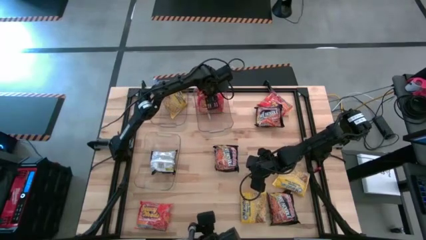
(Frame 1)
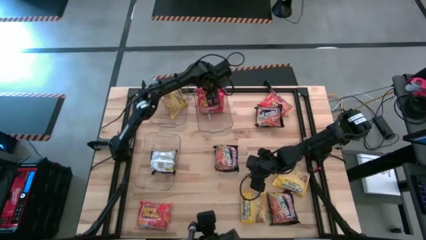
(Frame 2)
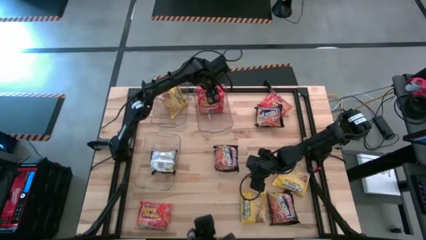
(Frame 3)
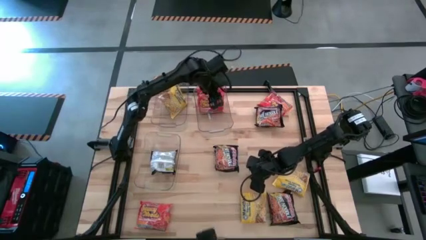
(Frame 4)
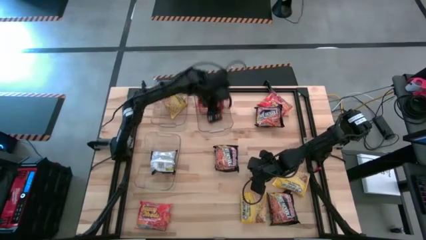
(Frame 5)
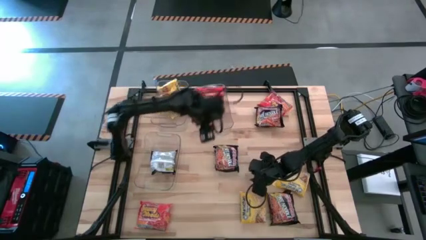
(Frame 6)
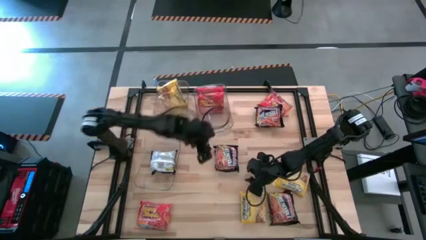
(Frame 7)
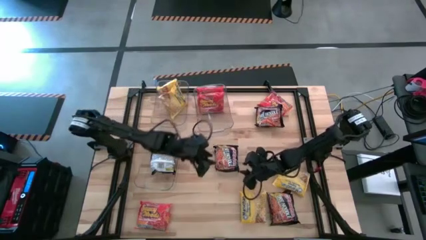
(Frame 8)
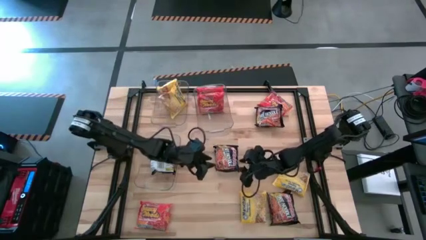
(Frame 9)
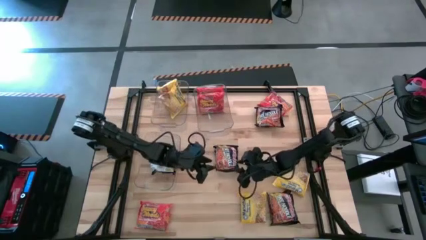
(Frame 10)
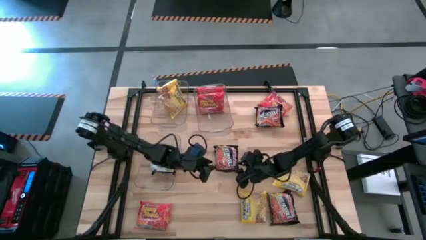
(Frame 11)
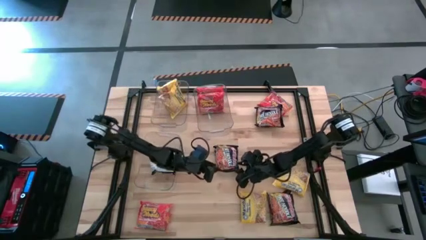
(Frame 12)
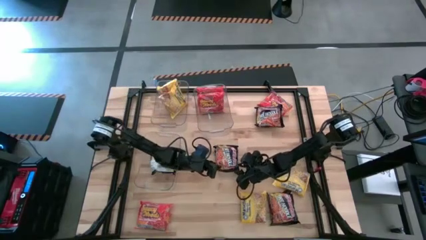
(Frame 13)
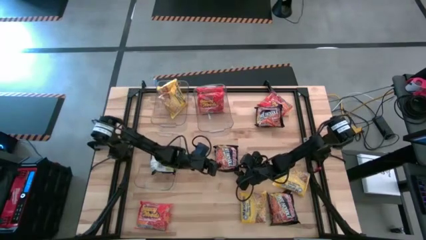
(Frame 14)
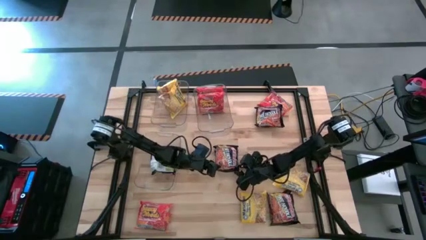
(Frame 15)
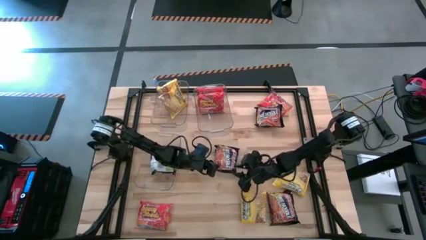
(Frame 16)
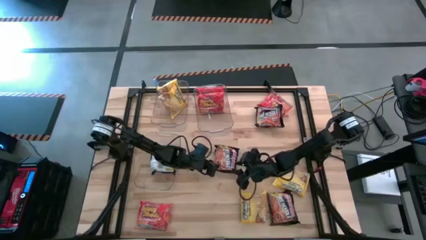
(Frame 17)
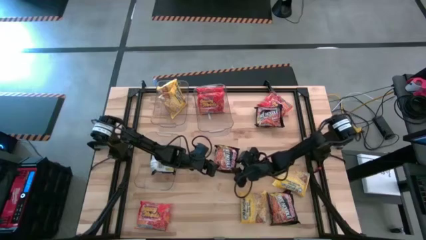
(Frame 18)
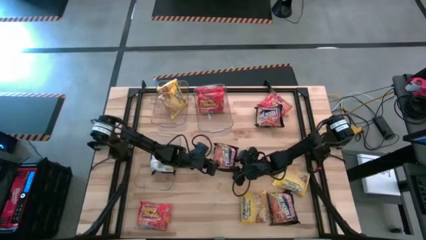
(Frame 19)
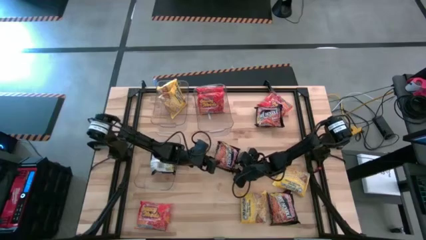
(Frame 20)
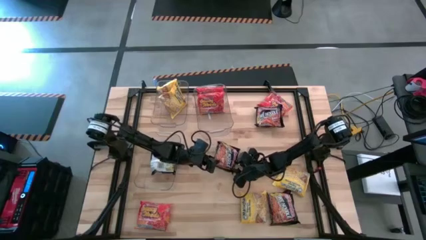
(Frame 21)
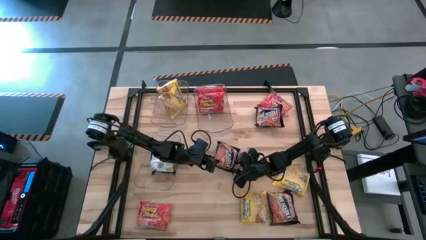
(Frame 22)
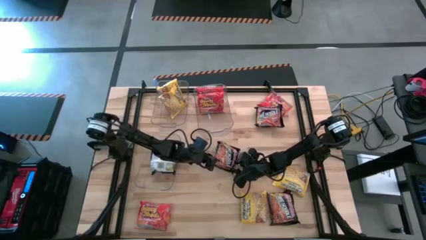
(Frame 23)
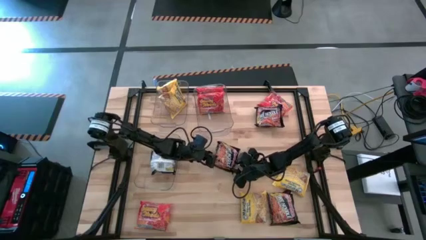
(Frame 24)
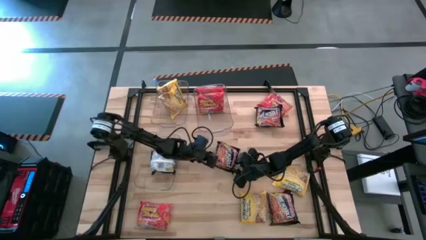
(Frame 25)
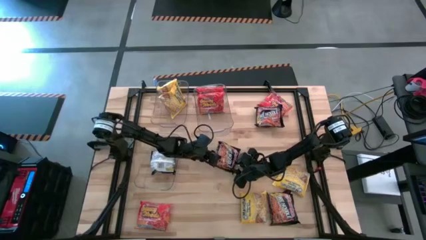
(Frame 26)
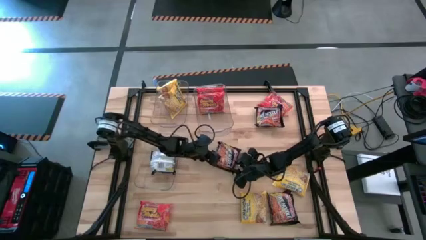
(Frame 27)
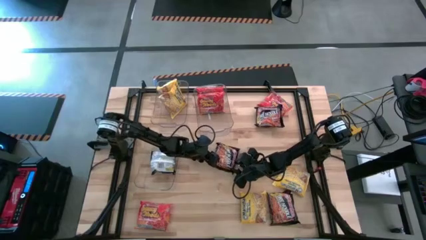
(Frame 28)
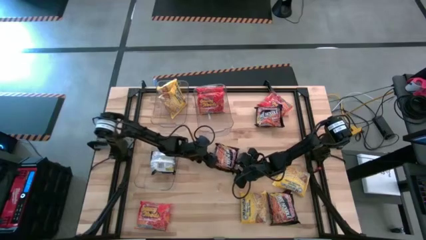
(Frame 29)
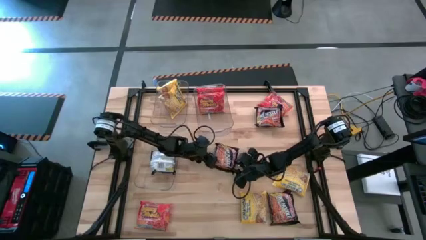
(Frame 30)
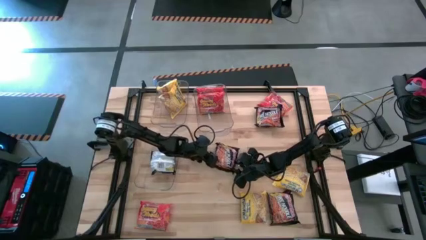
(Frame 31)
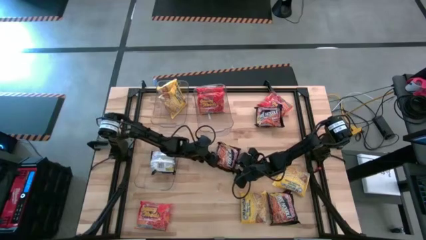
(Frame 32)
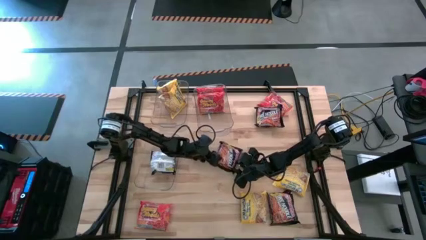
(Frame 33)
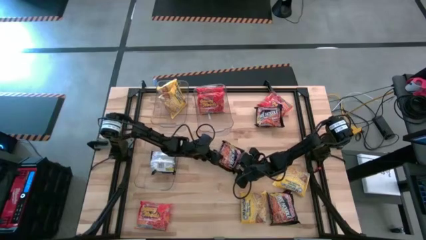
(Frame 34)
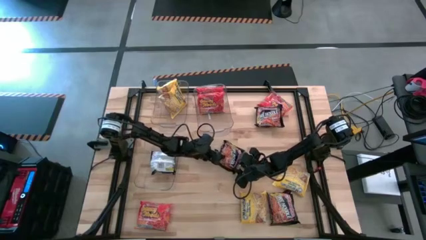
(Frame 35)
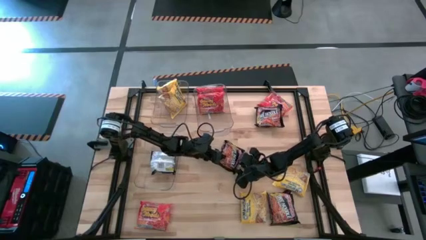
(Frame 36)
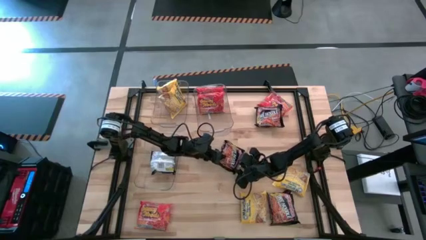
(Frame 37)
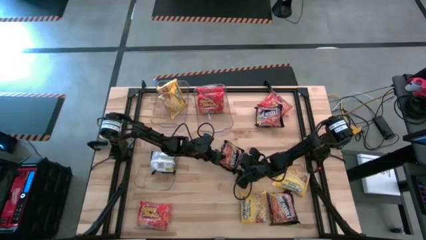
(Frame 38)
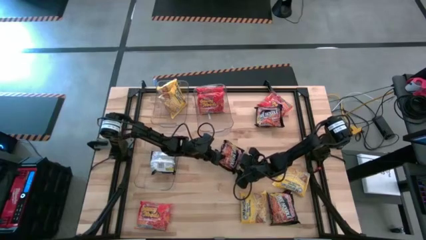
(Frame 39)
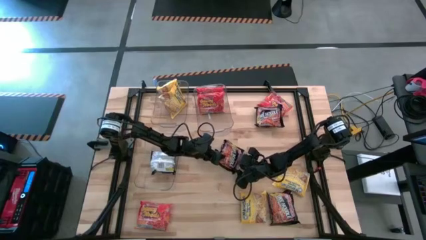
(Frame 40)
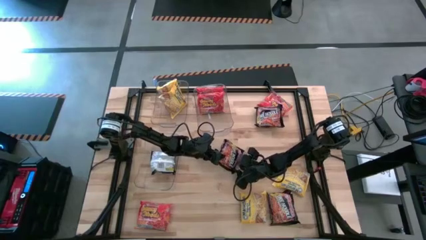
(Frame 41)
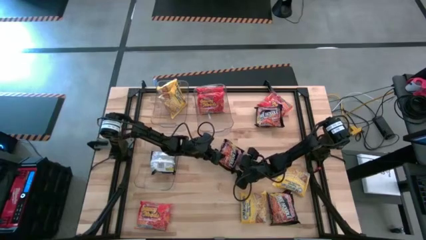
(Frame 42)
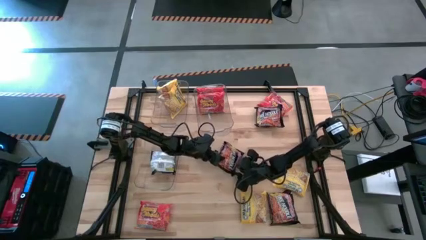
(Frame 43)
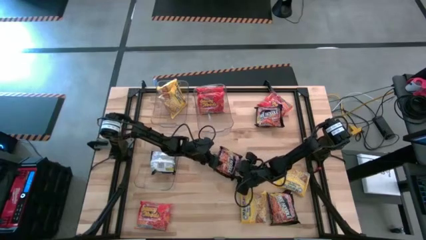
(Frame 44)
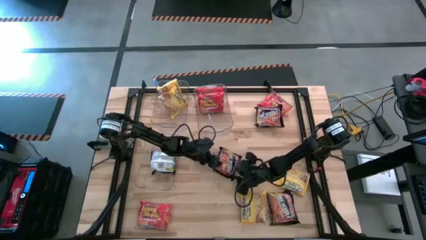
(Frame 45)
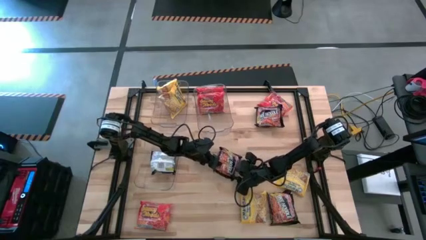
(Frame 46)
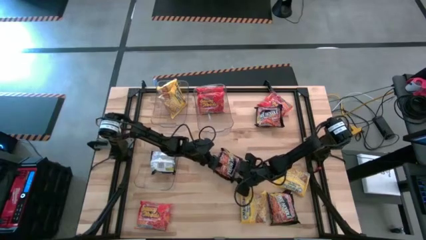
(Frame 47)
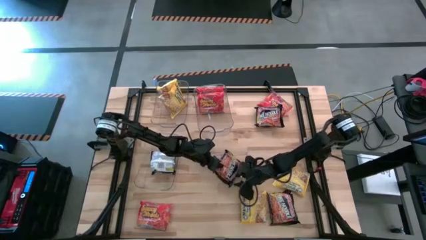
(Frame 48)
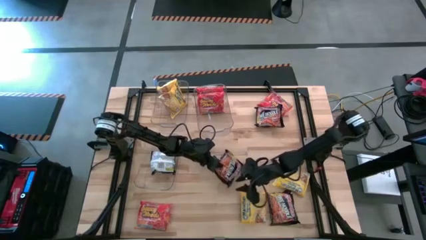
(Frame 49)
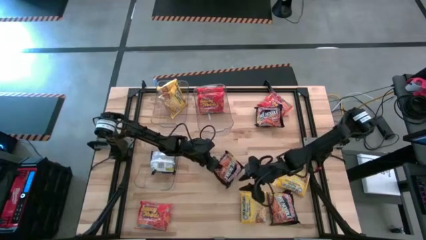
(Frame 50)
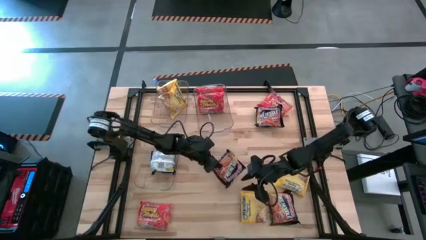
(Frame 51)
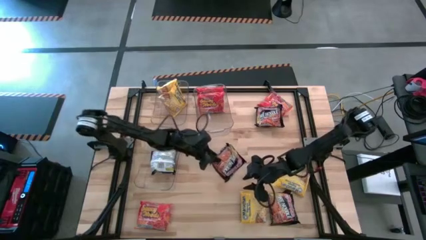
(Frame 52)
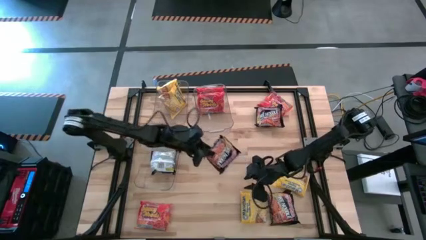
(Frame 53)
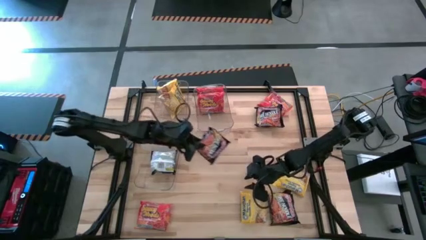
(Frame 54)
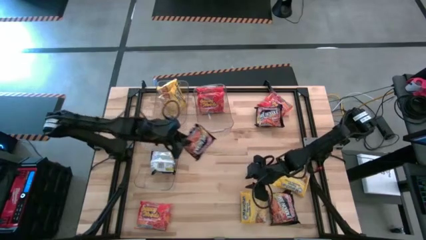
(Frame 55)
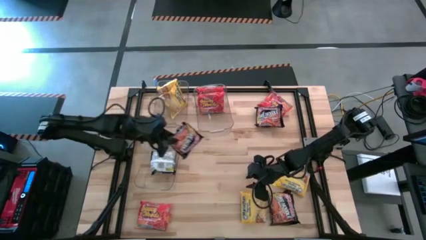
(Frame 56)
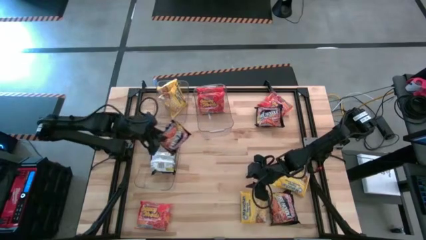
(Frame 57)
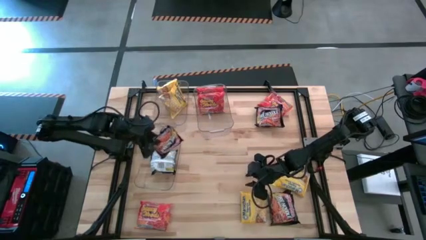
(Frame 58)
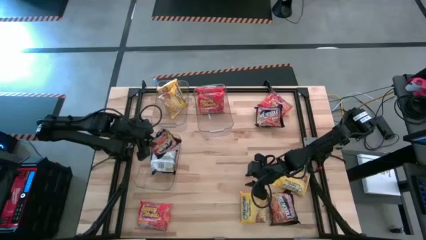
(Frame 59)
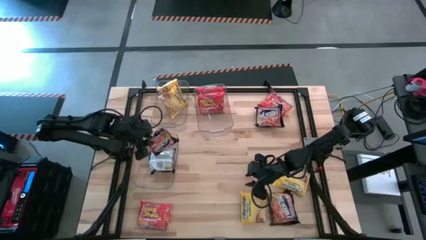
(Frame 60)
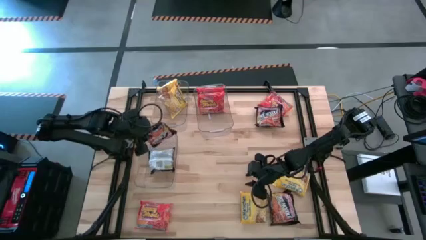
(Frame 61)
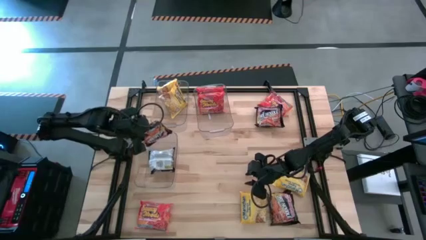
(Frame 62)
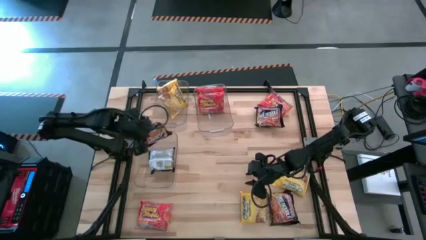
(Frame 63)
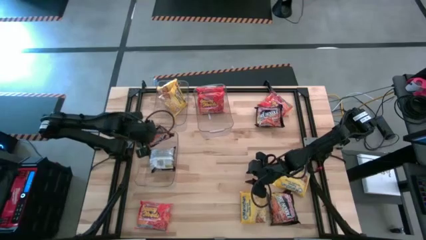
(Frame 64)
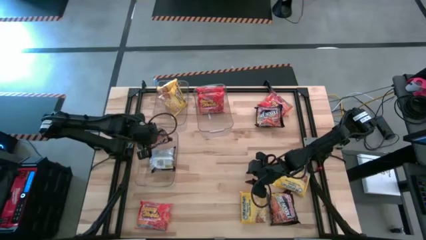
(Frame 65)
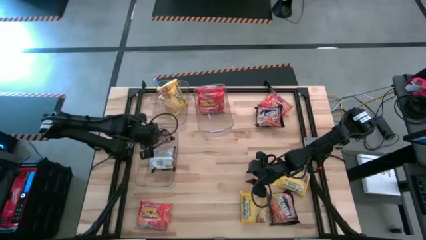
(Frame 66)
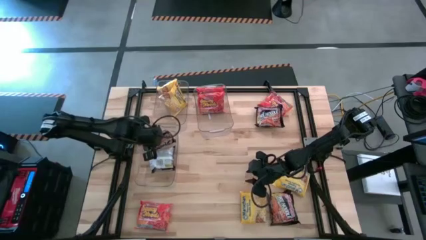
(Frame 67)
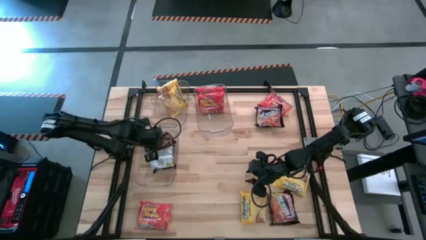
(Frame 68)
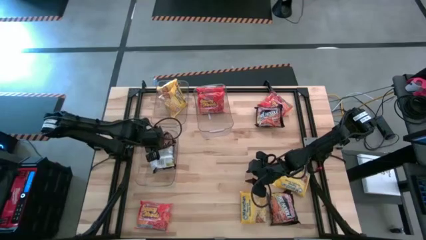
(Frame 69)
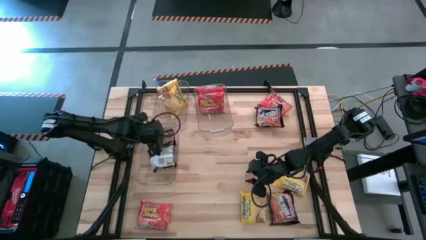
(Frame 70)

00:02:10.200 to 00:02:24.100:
Task: Sort Maruchan noodles
Put the black noodle pack into the bottom transparent bin

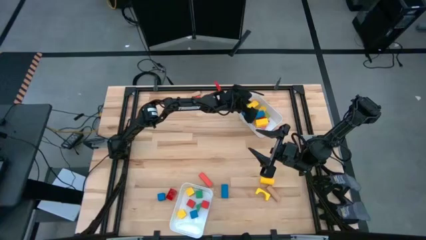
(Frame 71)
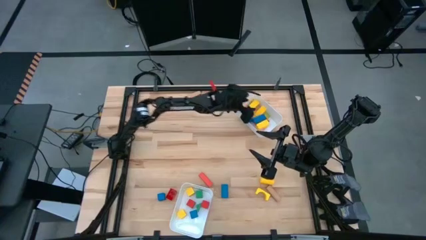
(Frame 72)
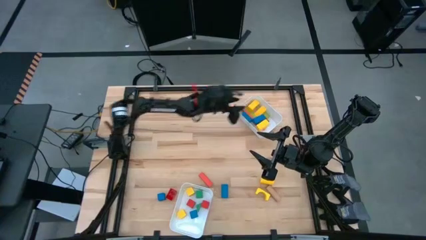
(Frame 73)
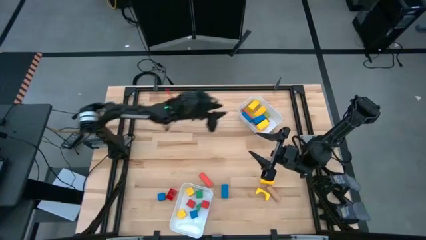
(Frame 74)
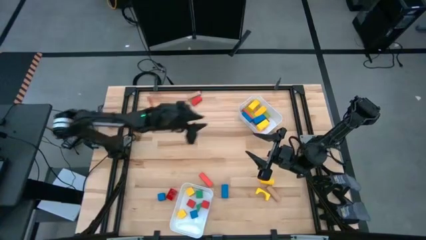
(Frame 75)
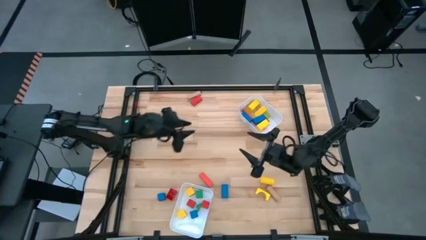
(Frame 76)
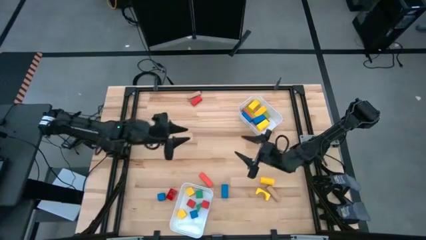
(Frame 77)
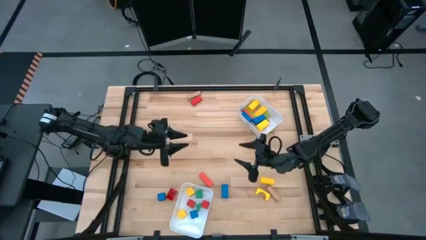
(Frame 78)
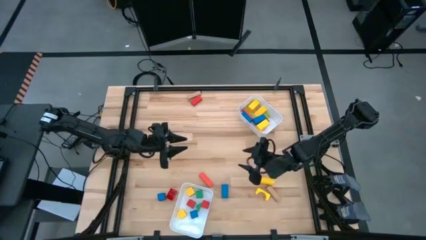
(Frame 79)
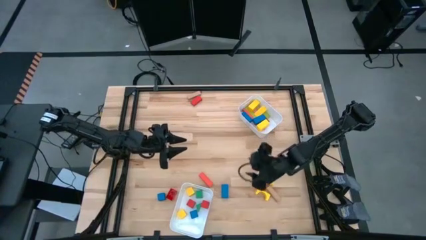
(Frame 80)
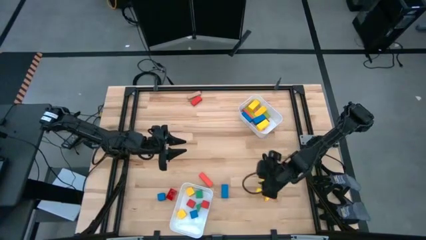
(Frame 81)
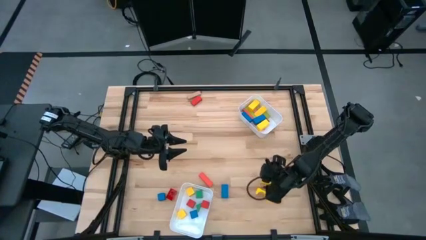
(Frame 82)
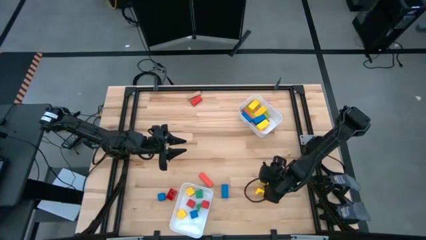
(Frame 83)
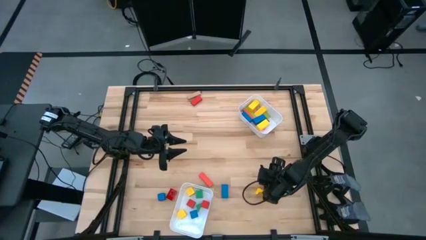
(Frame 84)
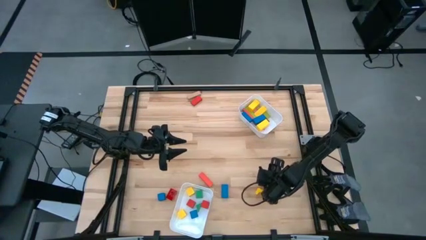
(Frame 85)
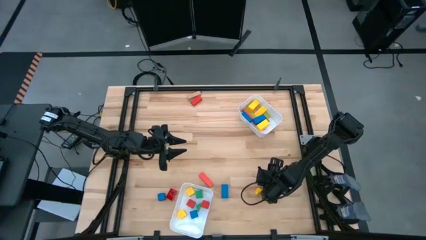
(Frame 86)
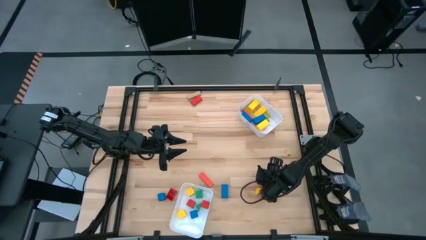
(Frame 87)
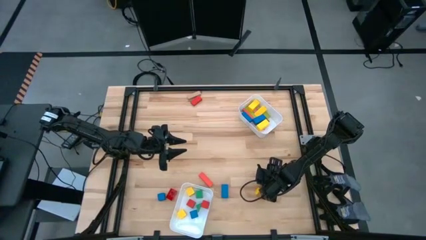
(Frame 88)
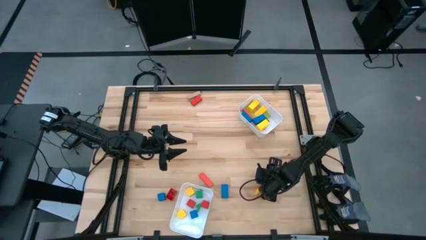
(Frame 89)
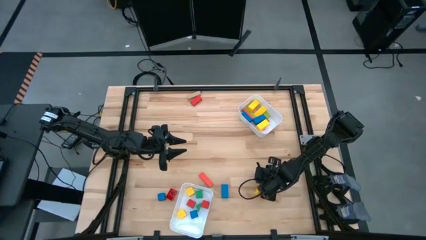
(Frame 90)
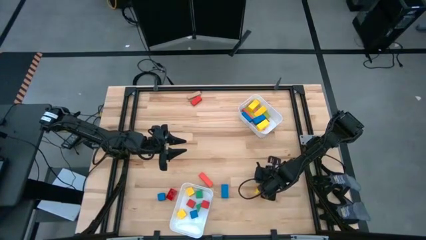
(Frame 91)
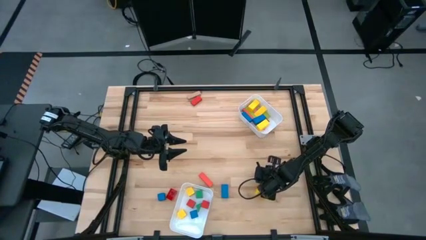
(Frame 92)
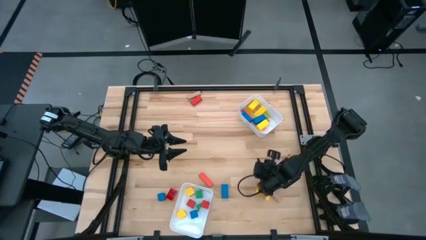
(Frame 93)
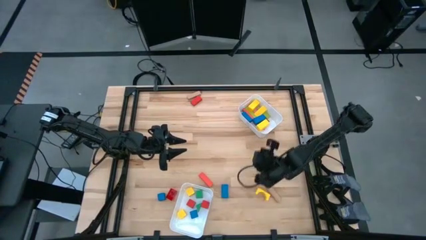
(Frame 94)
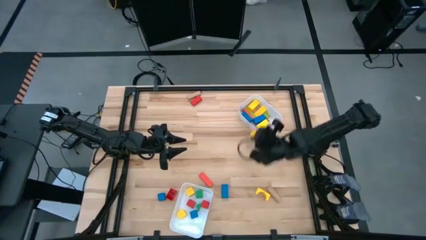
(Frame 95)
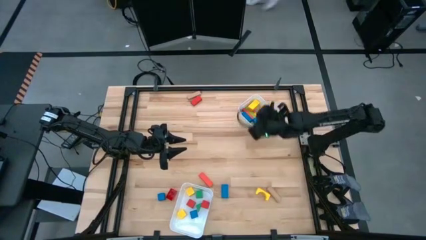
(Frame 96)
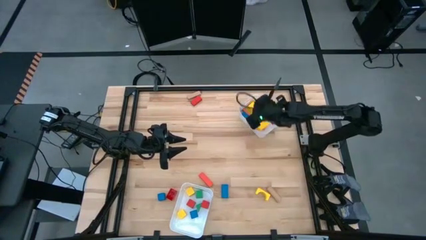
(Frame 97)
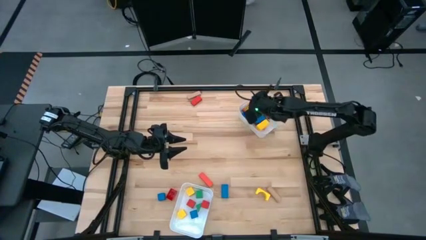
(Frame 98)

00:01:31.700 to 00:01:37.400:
Task: Sort blocks by size
Put the yellow cylindrical block into the top white bin
